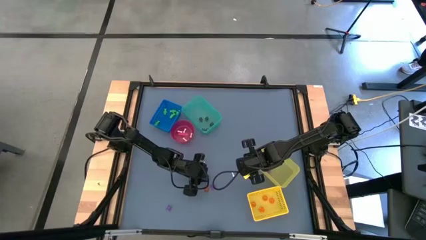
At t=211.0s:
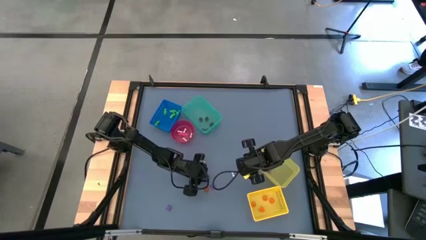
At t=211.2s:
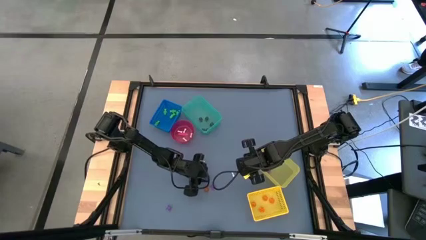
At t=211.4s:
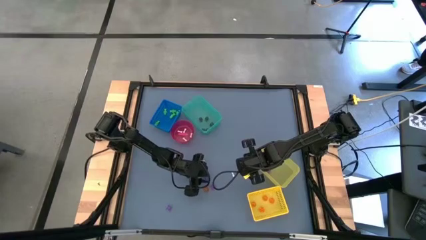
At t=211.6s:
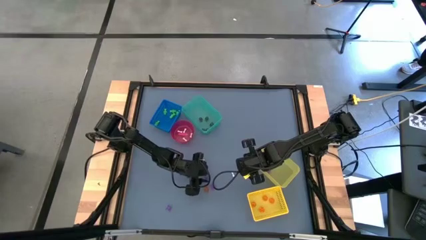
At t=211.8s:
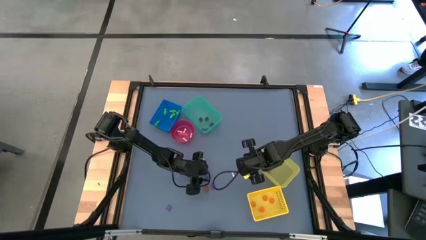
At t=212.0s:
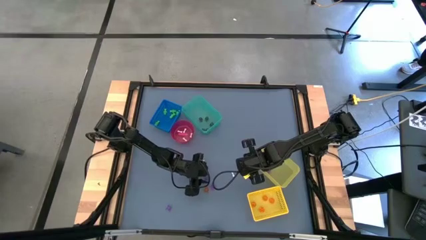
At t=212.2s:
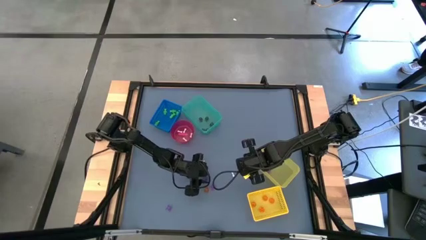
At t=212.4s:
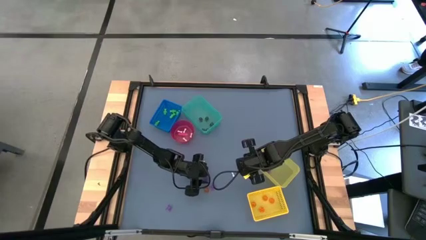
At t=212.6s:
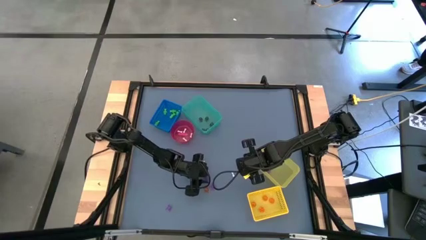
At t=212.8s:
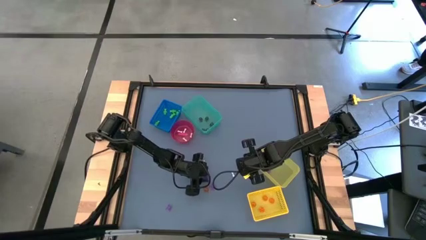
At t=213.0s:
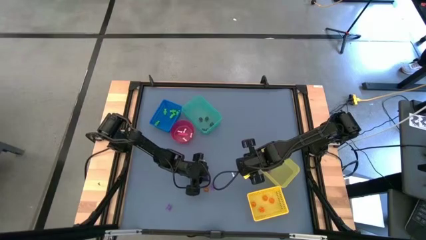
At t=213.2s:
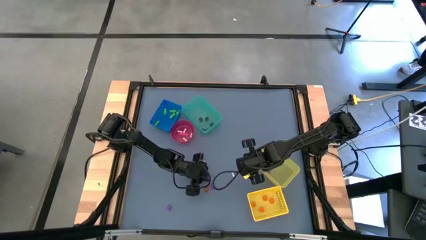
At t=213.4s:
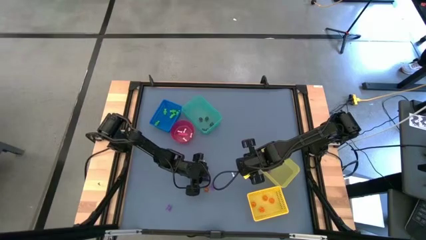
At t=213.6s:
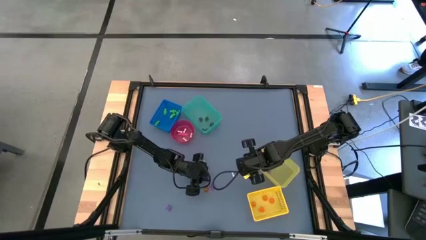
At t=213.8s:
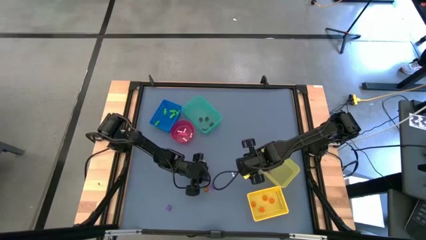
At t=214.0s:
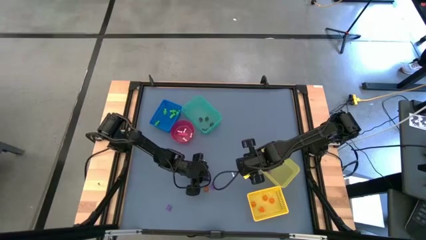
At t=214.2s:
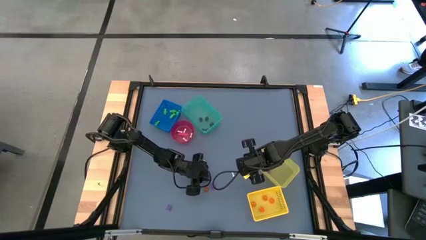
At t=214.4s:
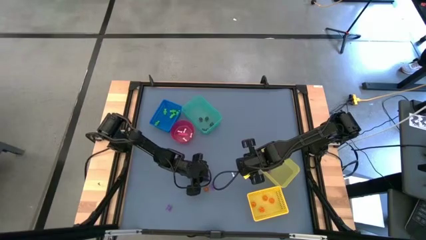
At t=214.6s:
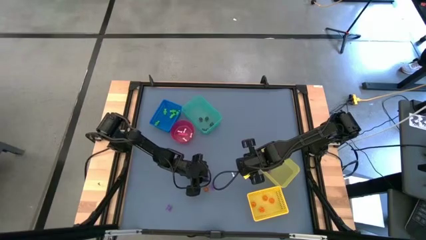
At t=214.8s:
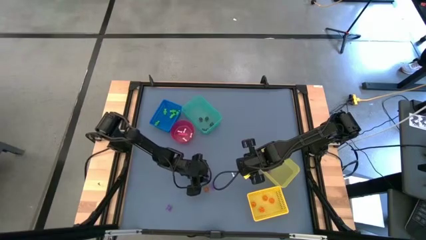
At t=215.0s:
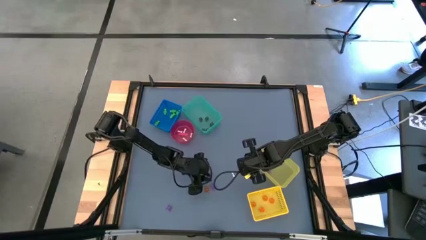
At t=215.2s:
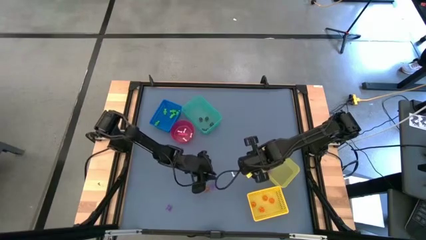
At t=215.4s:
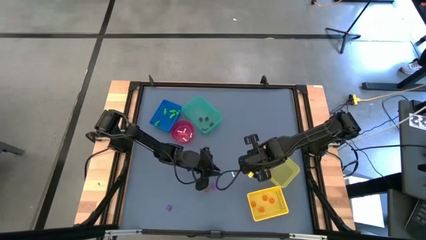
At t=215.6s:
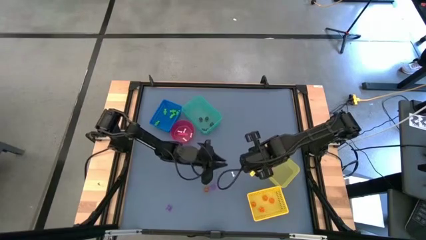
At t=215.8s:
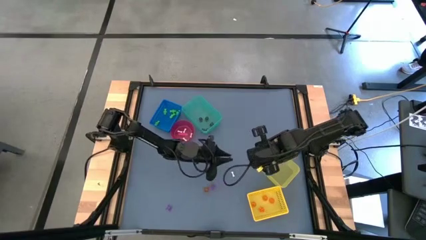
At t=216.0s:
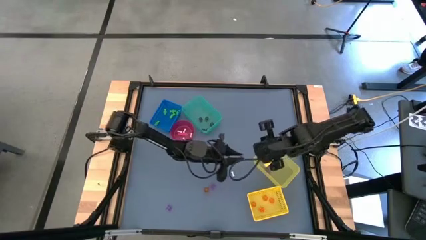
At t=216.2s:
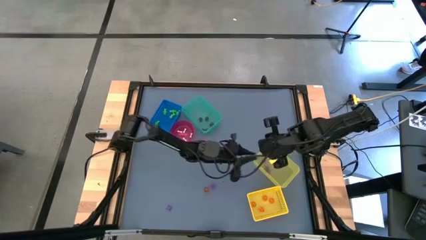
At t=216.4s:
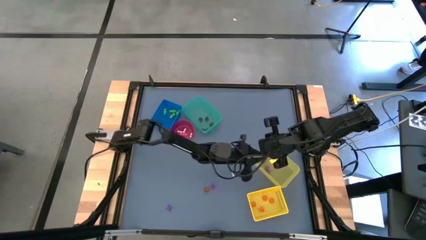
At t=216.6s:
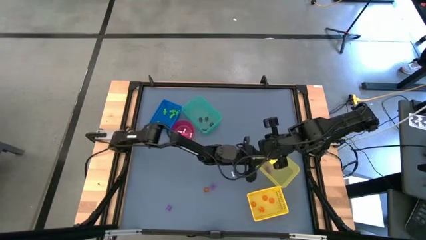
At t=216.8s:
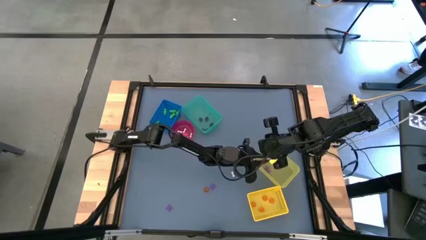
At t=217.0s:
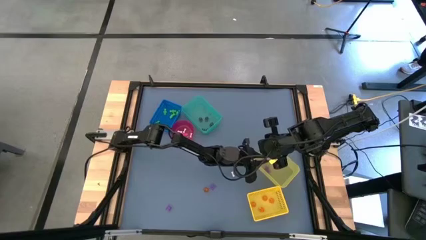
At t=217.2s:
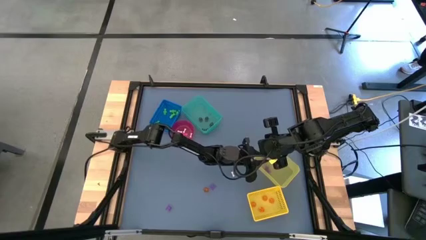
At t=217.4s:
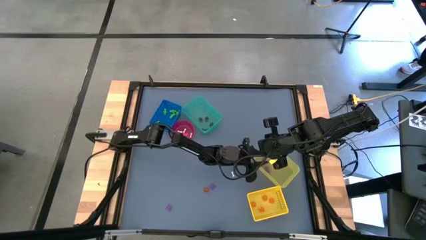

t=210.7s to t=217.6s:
Task: Sort Halloween decoration
Put the purple spider toy into the yellow bin

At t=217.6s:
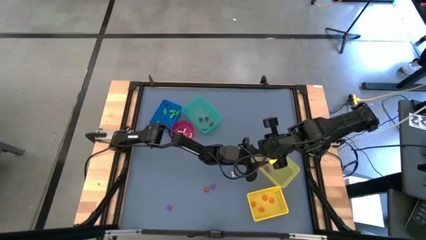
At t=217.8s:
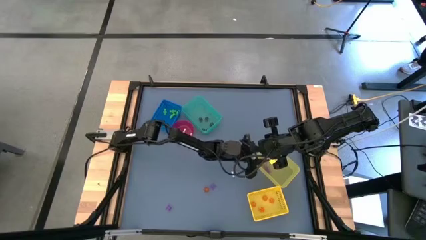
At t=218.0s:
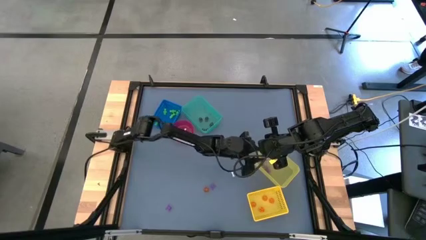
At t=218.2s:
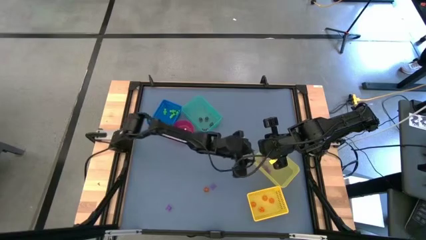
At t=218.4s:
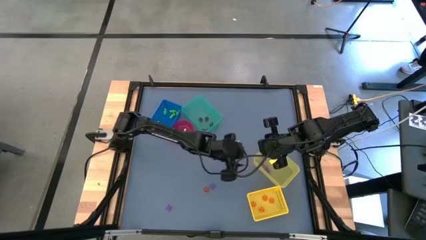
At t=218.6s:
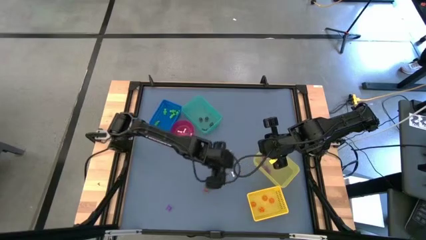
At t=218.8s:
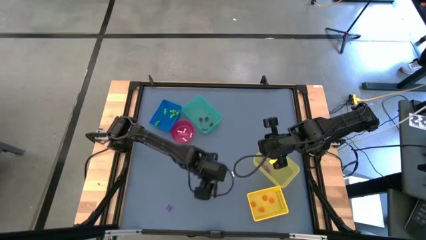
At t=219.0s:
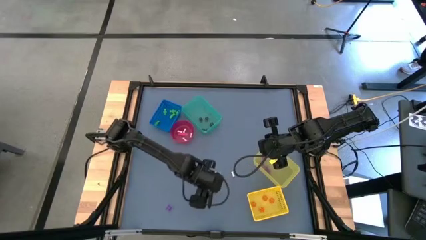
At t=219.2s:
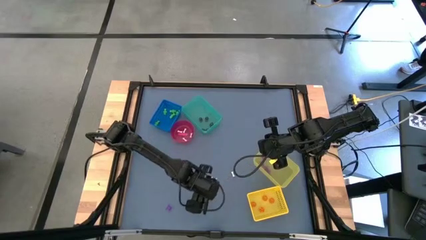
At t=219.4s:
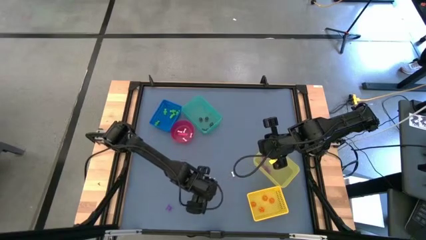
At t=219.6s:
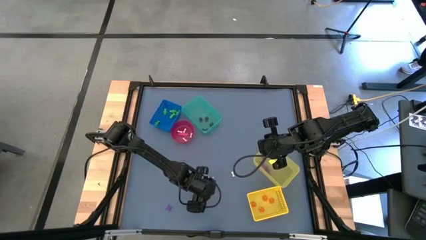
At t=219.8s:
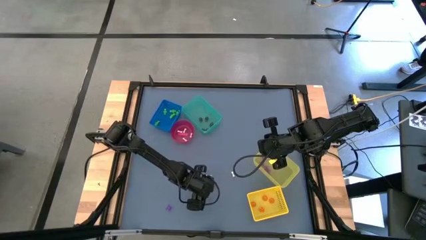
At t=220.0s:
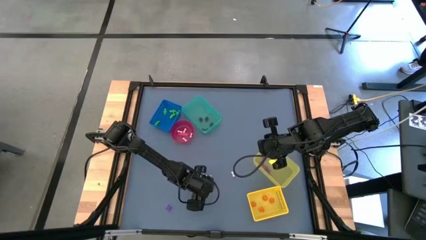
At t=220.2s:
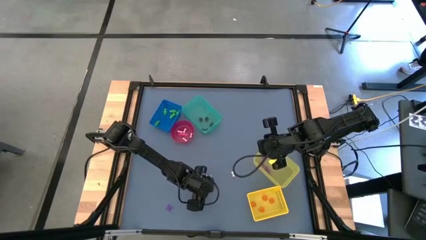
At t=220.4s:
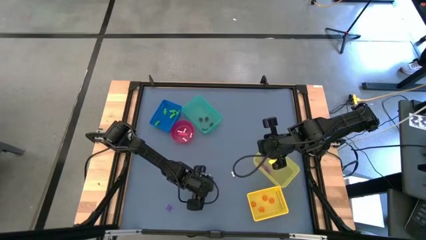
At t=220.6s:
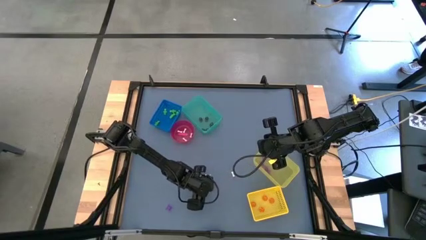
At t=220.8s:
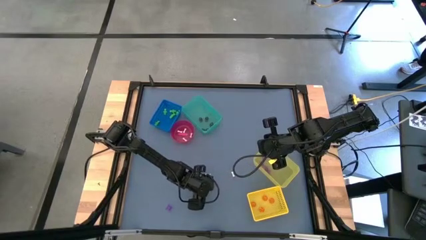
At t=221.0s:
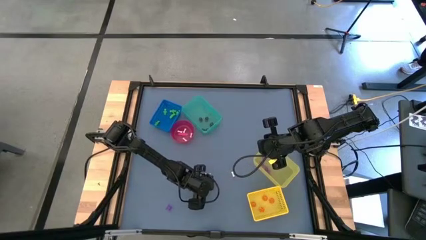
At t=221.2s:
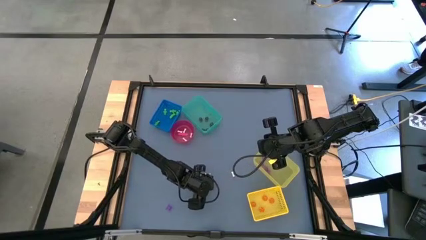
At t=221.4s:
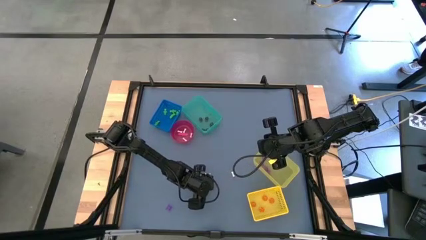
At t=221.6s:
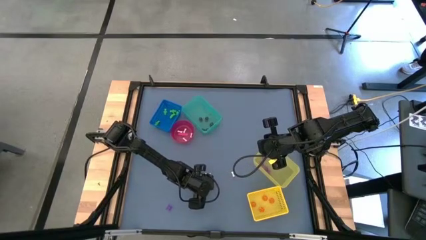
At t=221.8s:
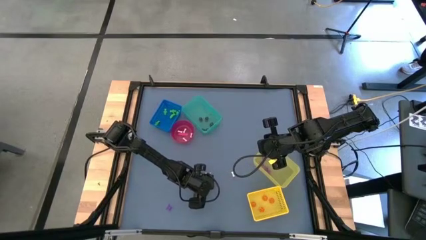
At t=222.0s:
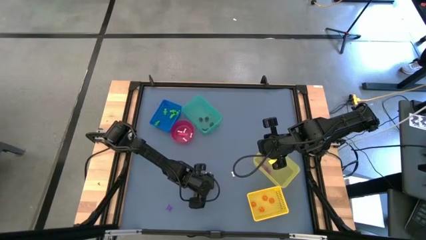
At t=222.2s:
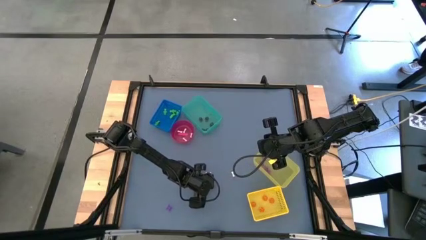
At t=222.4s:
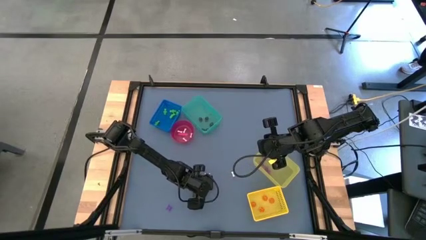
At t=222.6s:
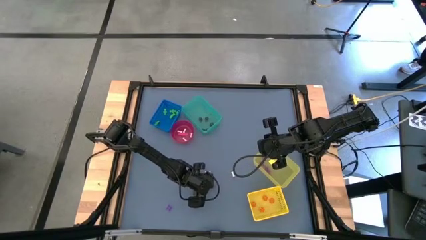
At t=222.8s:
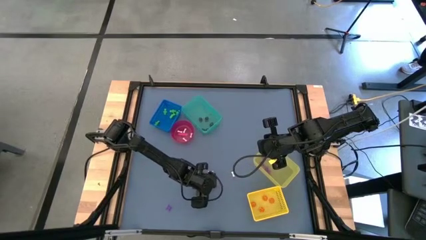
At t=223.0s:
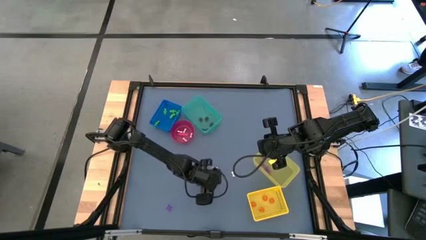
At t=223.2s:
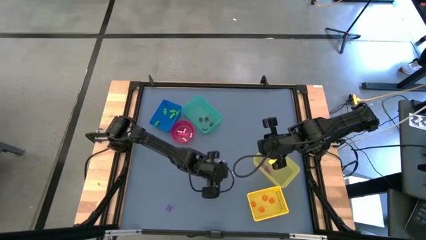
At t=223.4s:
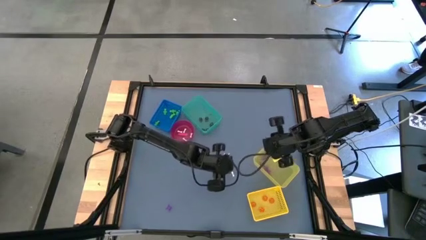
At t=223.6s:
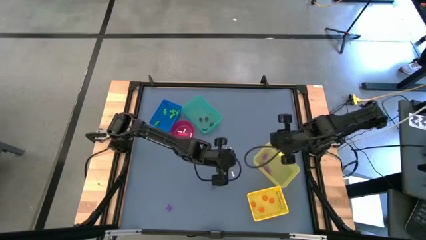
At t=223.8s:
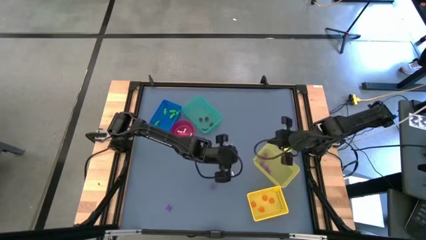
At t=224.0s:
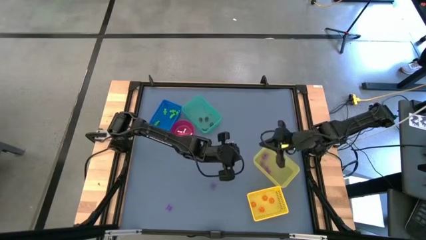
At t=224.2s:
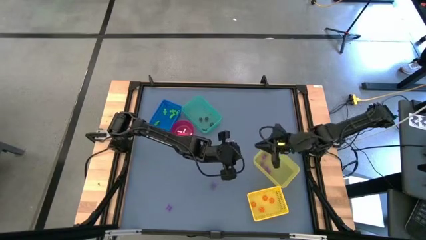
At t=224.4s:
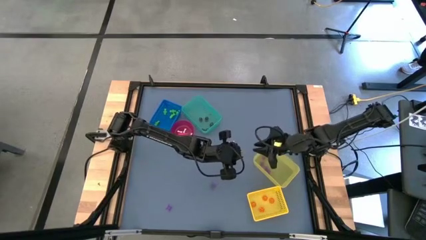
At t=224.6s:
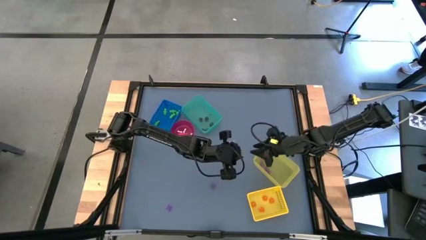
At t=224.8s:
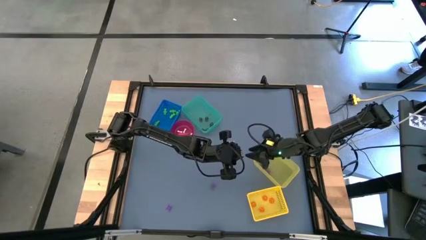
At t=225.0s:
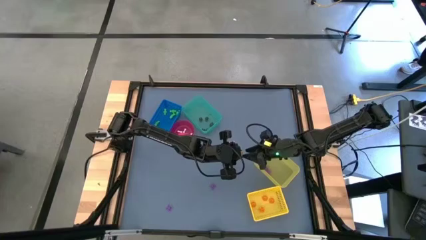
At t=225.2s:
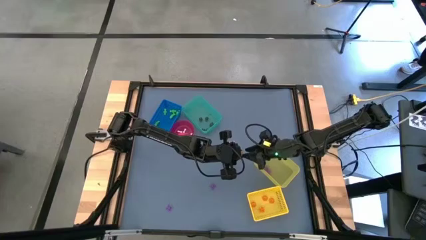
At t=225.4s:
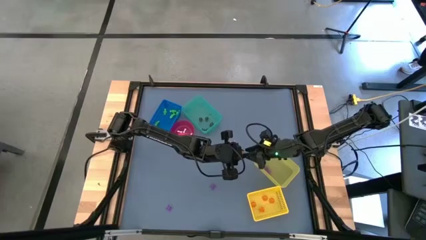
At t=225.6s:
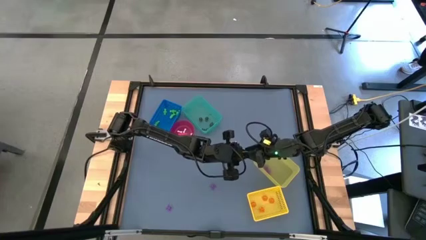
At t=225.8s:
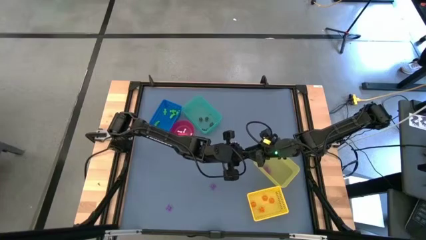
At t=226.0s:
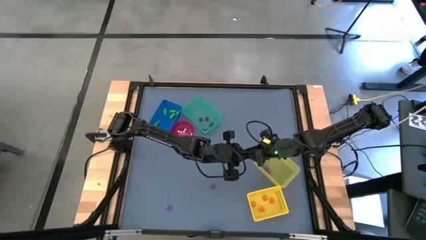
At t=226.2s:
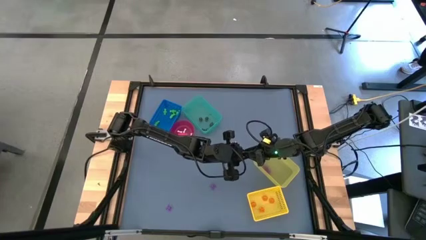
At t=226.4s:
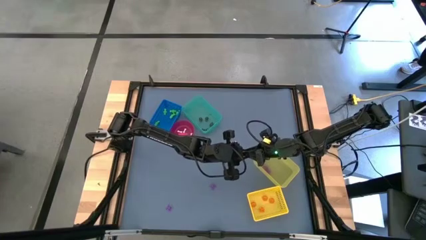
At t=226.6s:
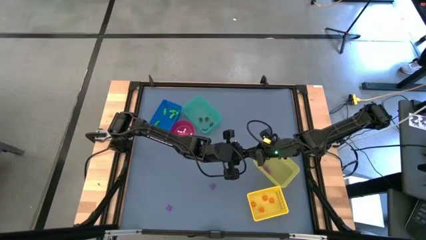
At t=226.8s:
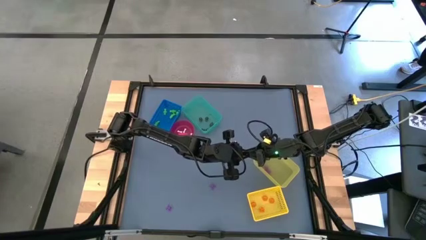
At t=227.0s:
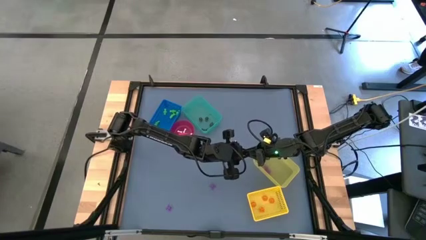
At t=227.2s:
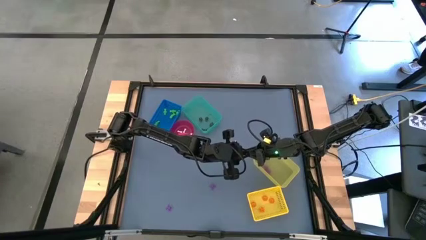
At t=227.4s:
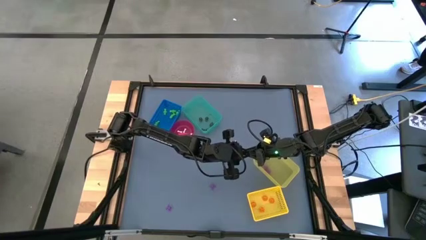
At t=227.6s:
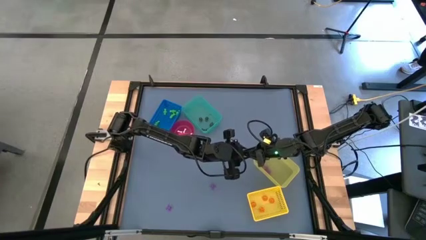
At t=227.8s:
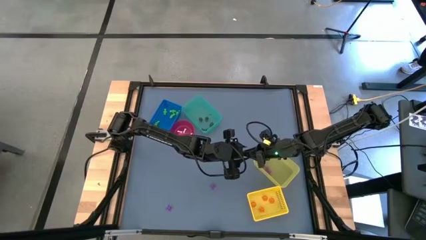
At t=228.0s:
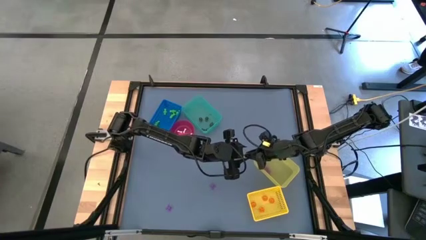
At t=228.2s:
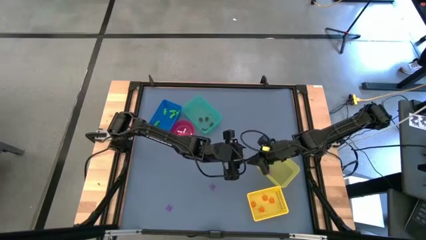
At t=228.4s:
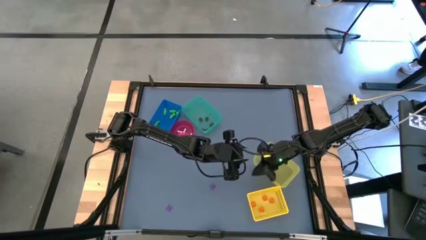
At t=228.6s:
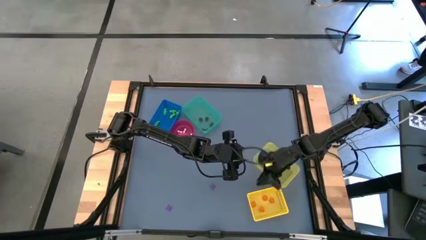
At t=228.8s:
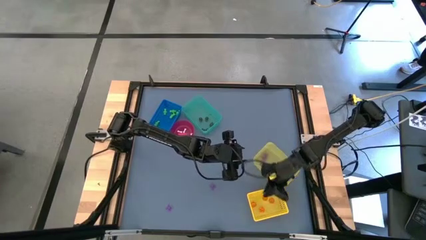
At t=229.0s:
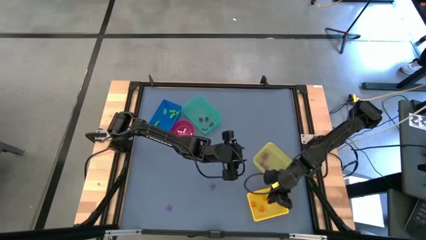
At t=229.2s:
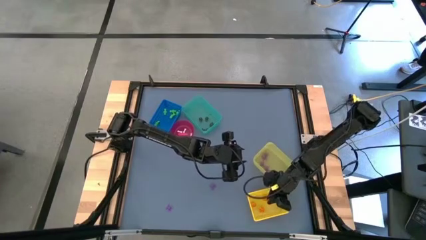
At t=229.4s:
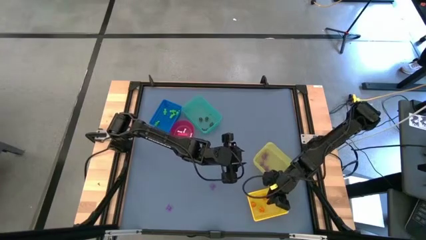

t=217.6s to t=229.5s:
Put the orange pumpkin toy into the yellow bin
